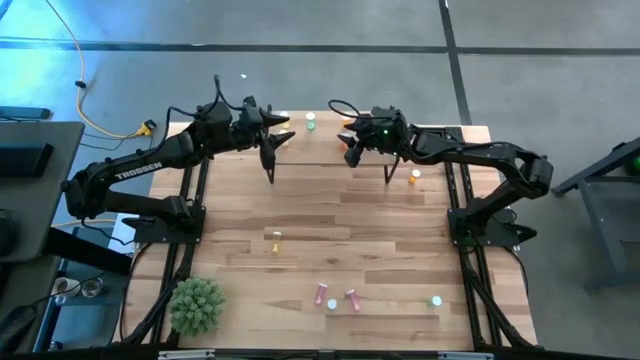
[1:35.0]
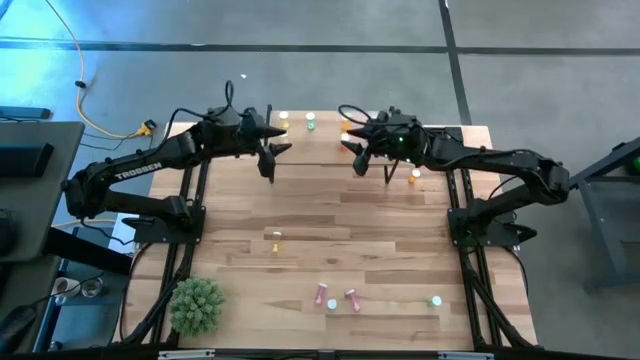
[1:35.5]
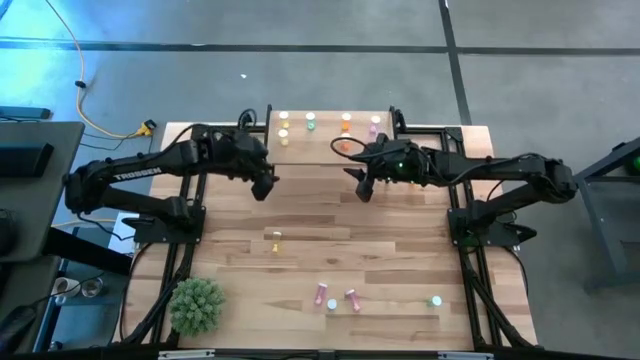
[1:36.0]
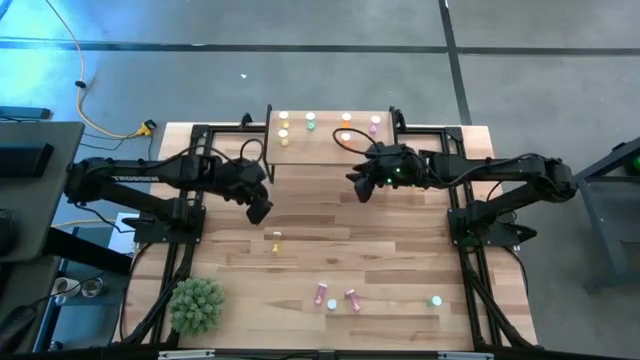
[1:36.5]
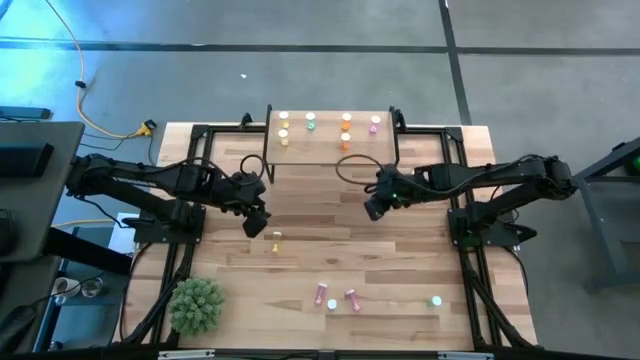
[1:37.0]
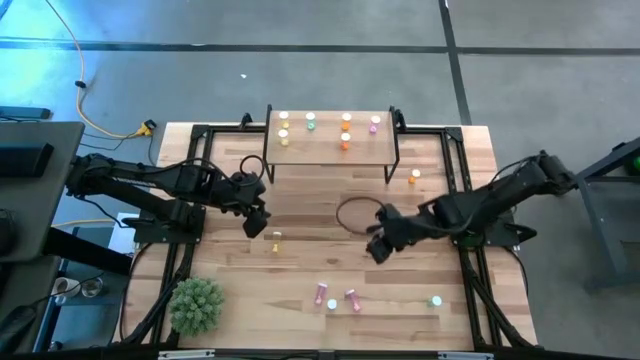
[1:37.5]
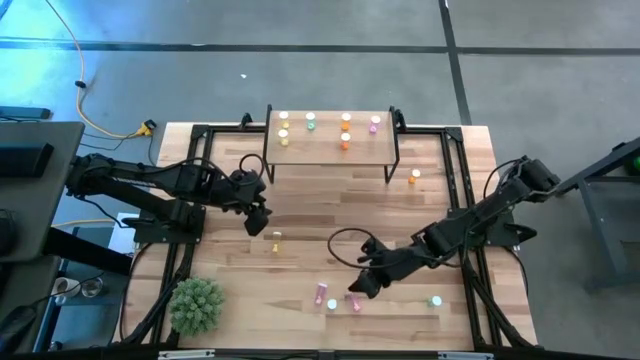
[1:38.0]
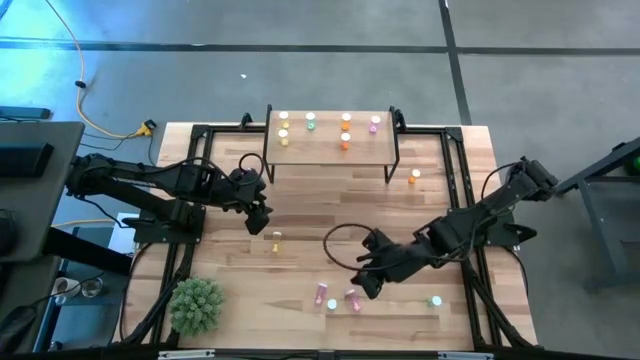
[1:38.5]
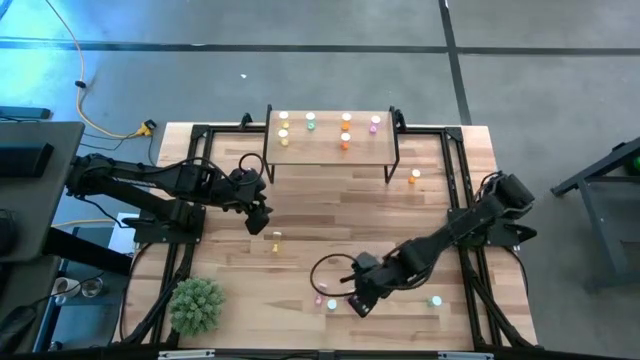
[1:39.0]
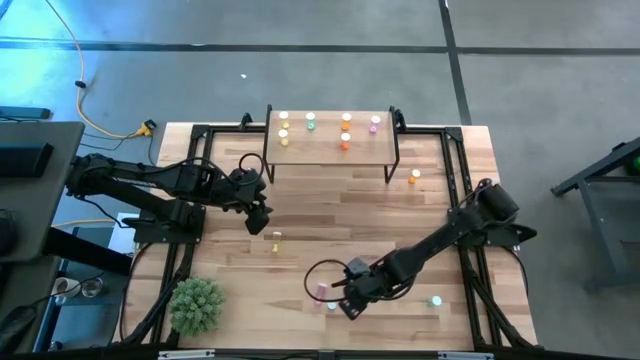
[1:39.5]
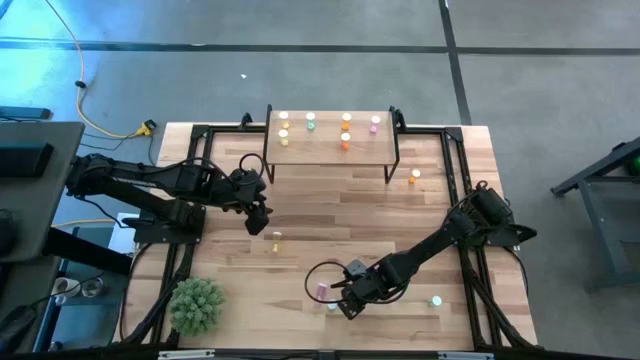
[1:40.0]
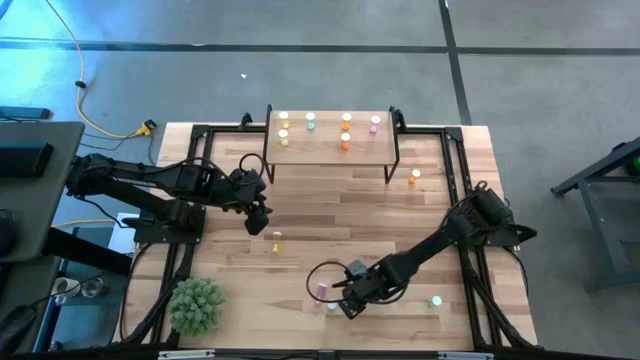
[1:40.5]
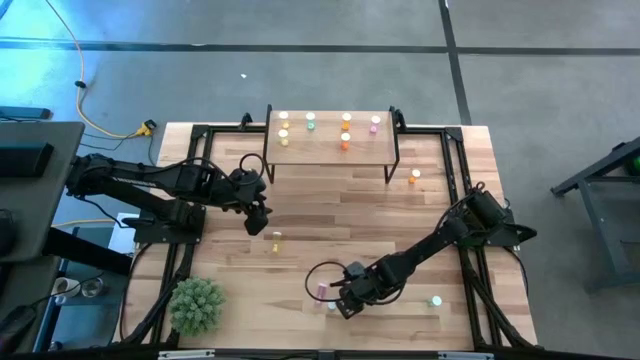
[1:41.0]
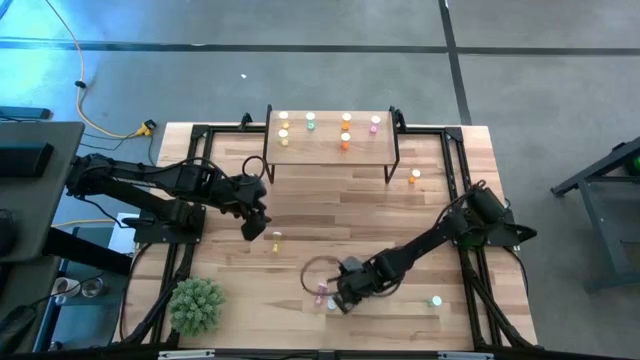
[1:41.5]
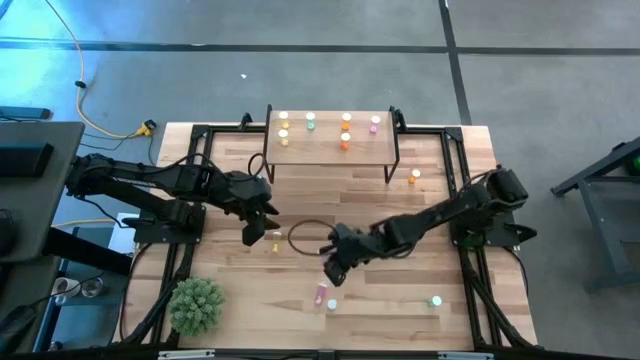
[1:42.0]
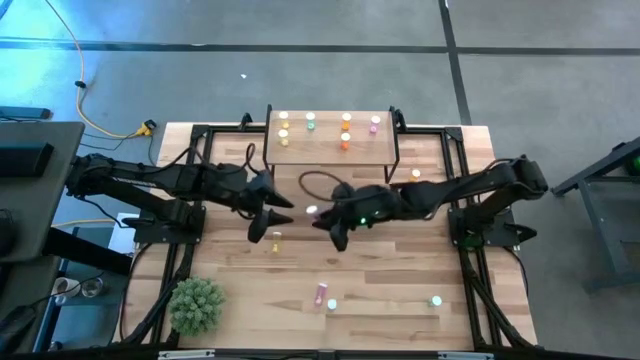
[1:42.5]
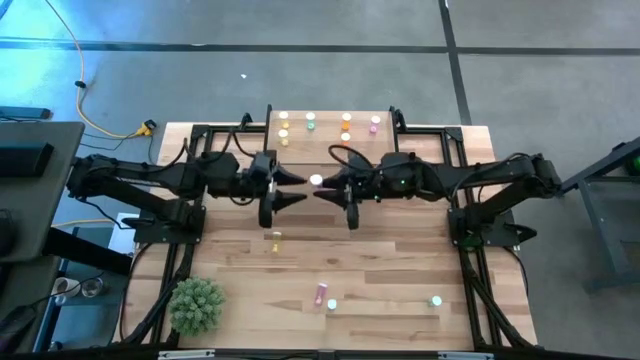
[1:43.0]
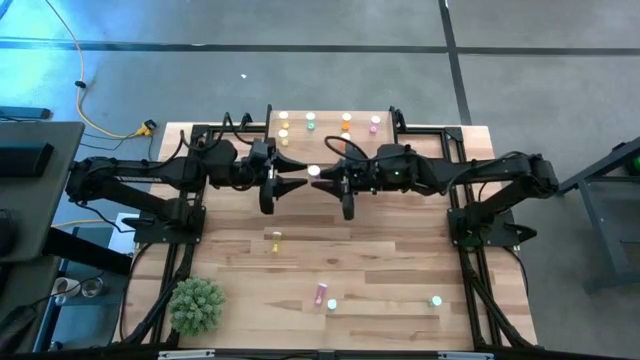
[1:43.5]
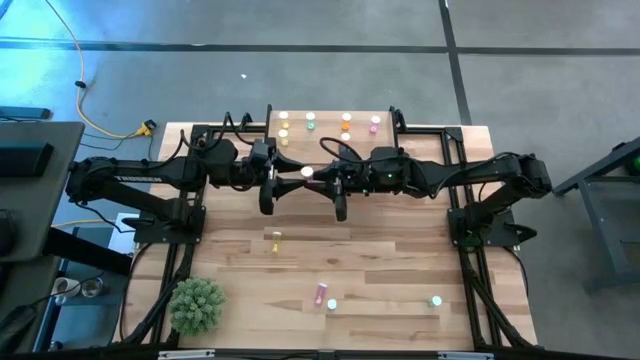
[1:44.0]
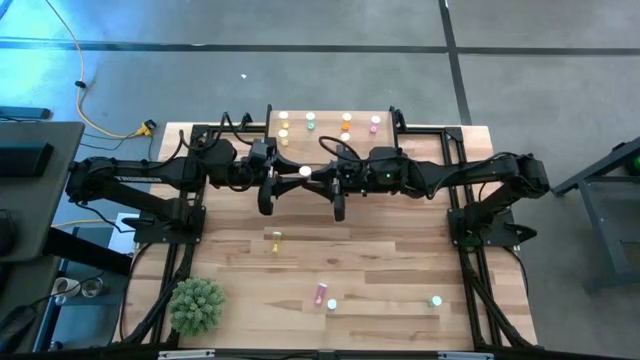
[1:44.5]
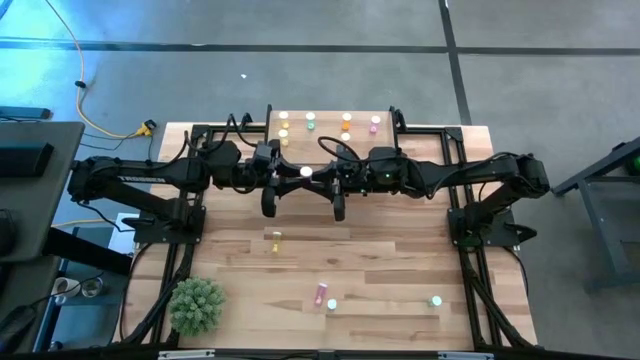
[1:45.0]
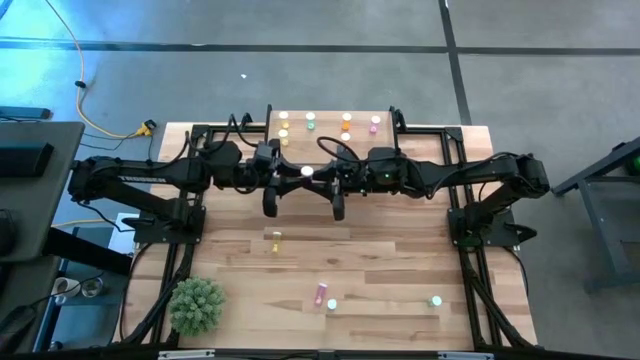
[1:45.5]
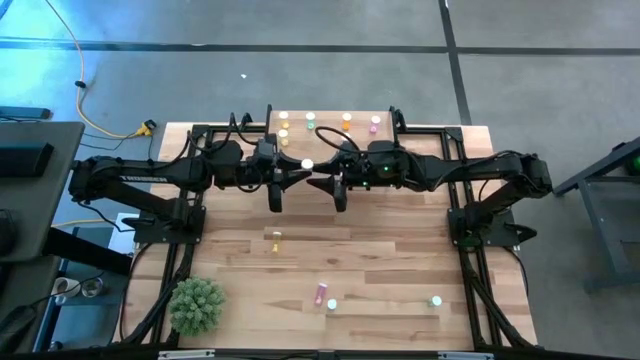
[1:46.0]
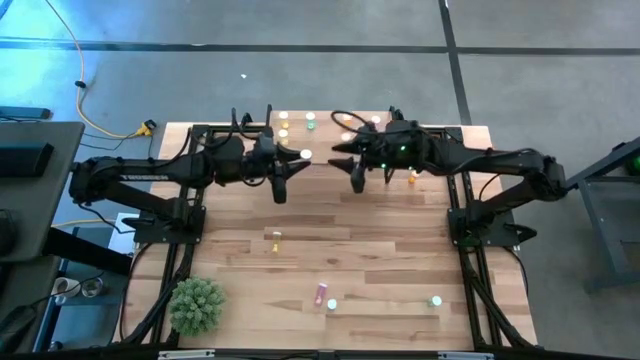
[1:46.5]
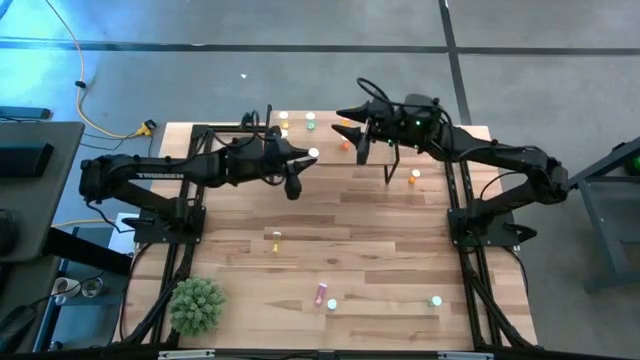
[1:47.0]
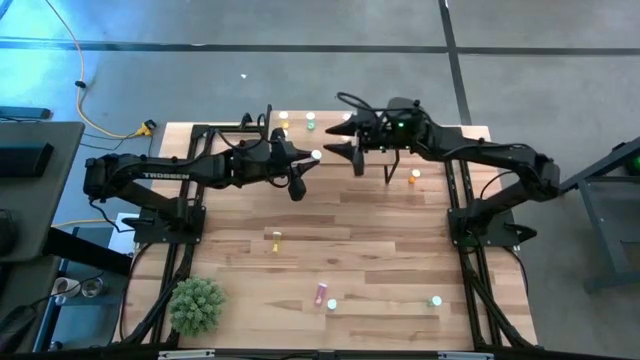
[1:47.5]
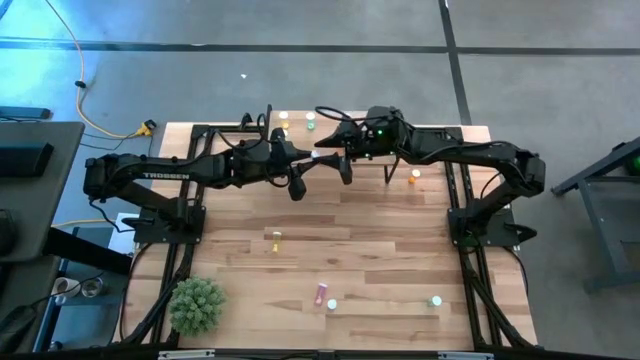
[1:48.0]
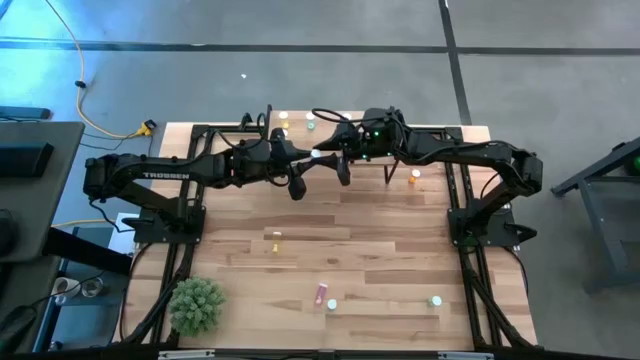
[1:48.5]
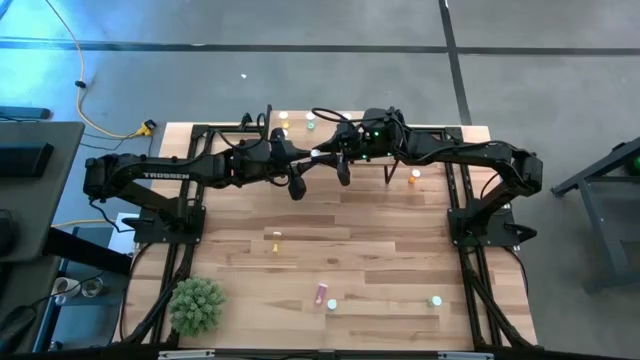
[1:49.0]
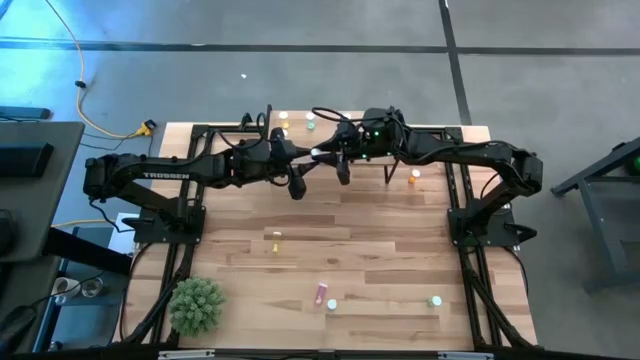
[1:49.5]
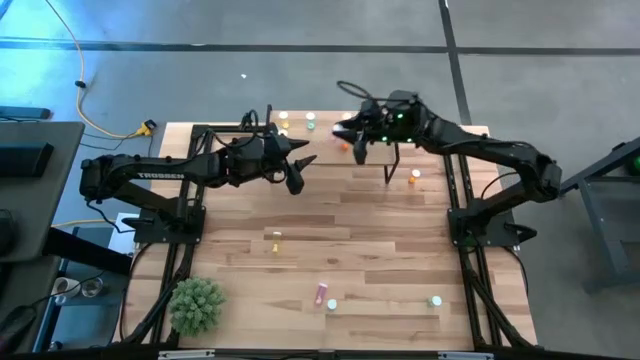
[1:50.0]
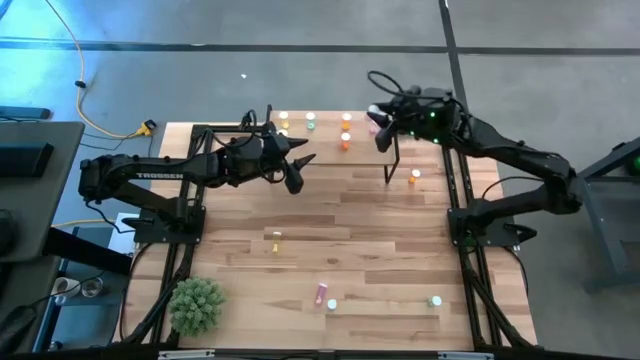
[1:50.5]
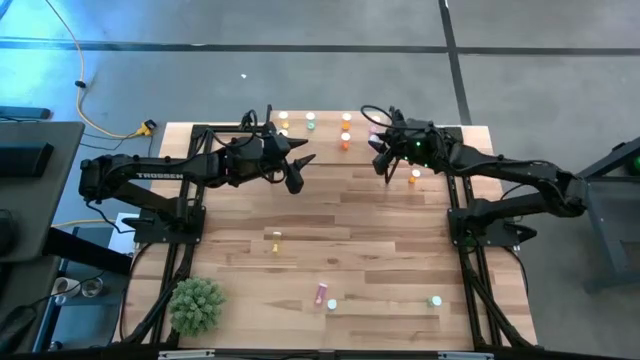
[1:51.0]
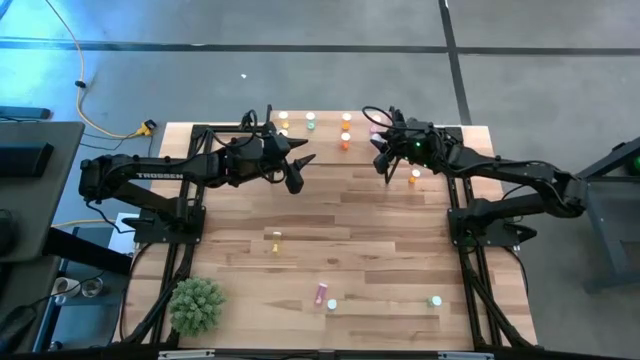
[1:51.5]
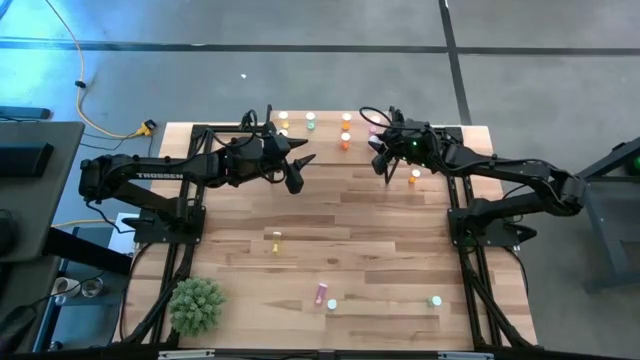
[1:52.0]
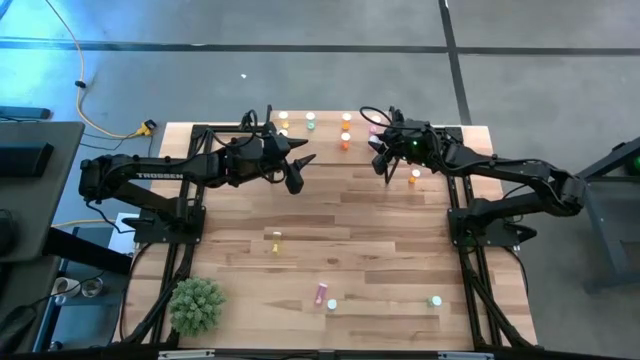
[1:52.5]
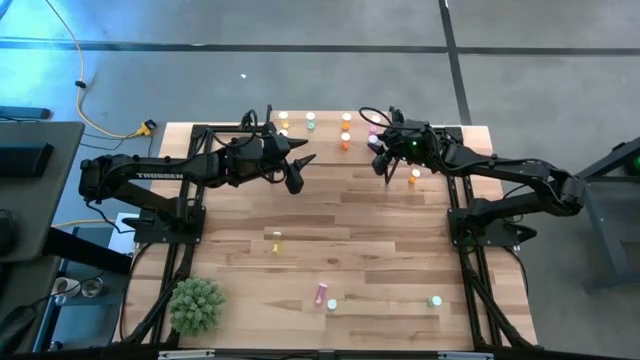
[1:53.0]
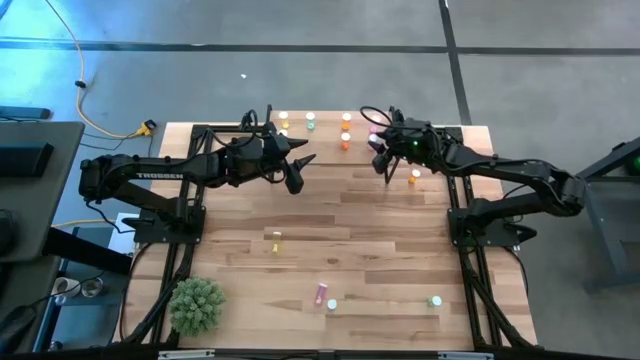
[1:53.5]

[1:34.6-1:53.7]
Task: Pick and place medicine bottles onto shelf by color
Put the right pink pill bottle on the shelf aligned with the other pink pill bottle

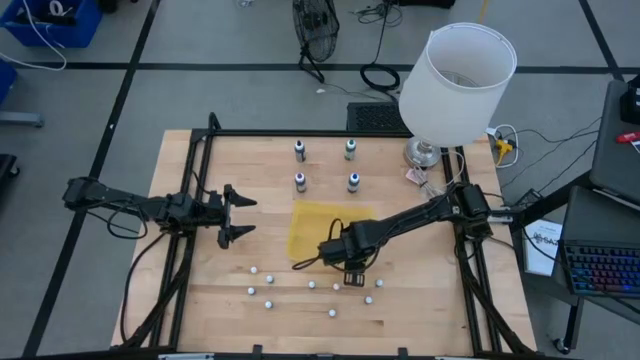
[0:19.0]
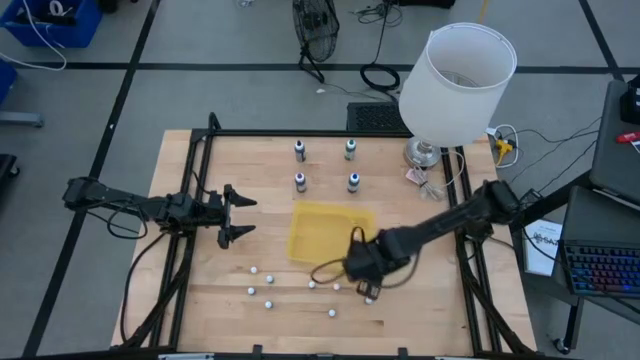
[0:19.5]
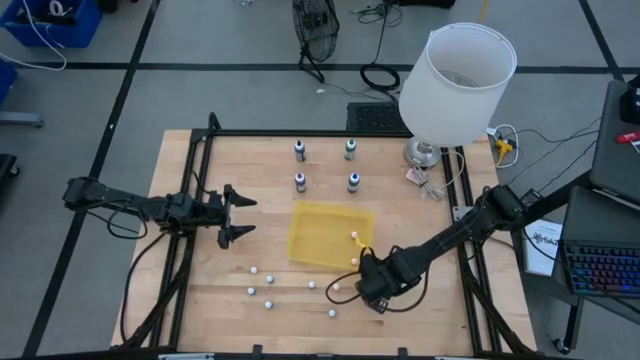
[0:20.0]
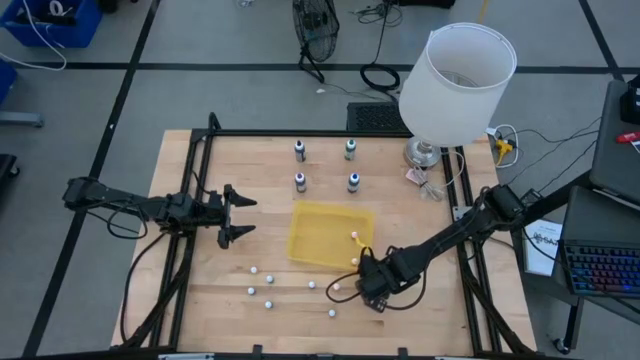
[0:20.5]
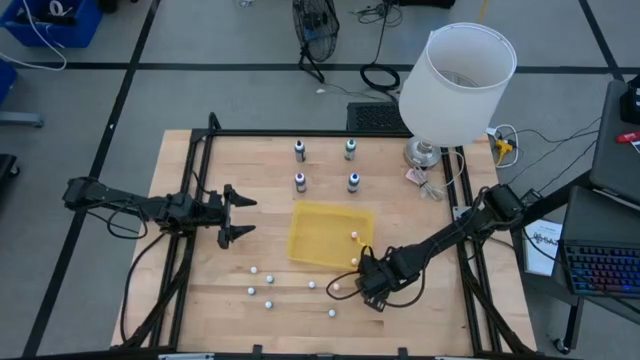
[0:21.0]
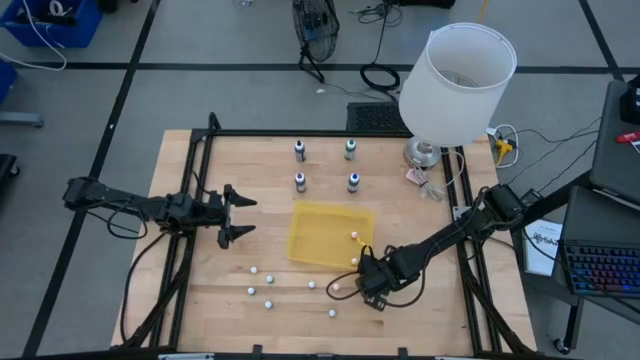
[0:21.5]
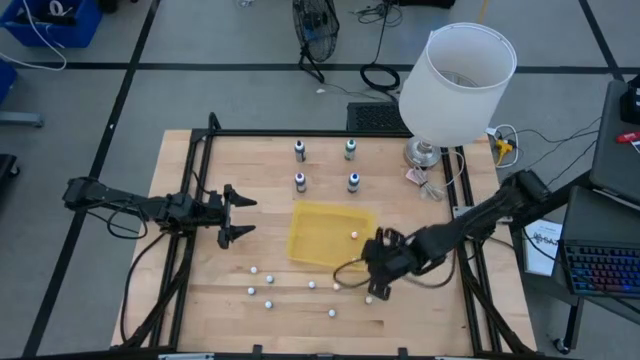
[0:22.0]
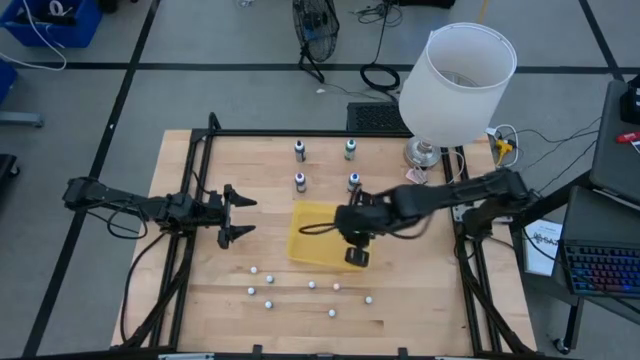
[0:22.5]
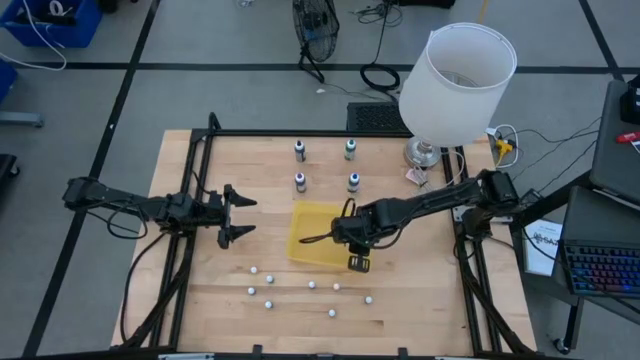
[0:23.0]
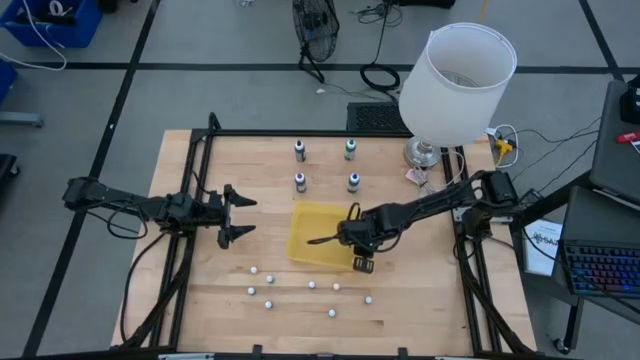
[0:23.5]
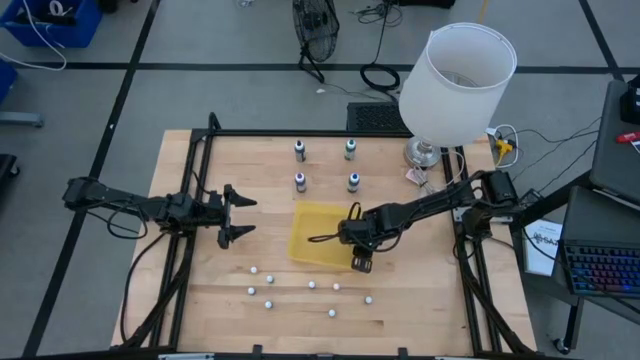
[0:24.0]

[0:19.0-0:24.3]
Task: Pick & Place food coloring
Put the small purple food coloring bottle into the yellow container
